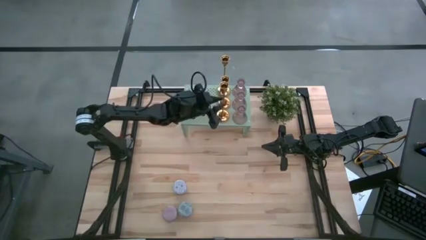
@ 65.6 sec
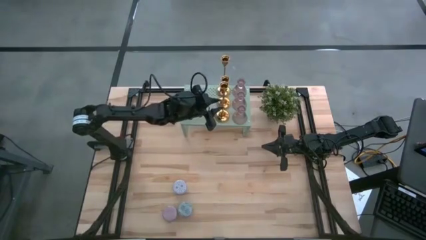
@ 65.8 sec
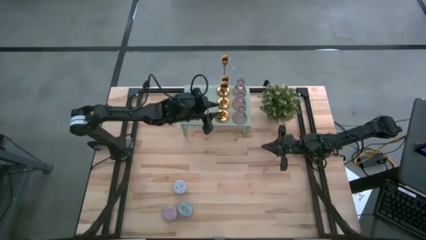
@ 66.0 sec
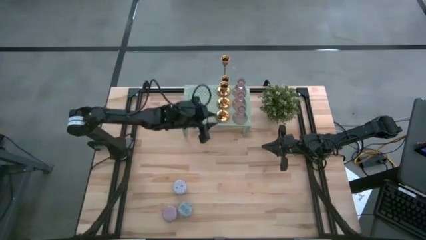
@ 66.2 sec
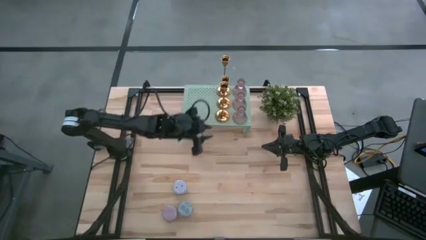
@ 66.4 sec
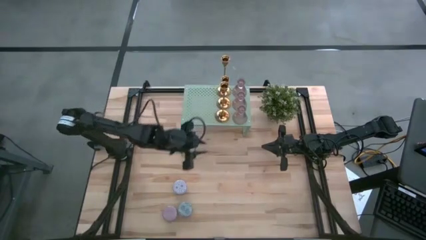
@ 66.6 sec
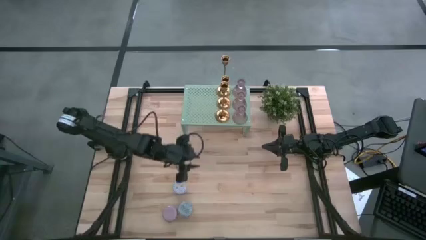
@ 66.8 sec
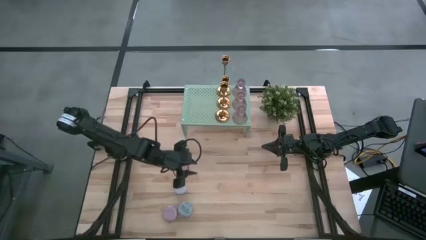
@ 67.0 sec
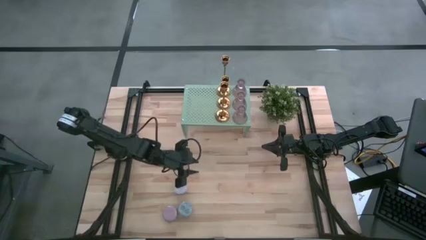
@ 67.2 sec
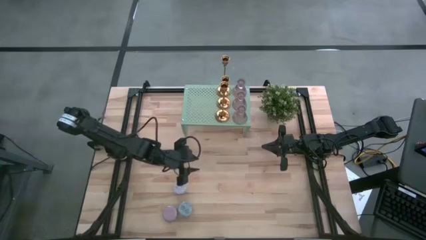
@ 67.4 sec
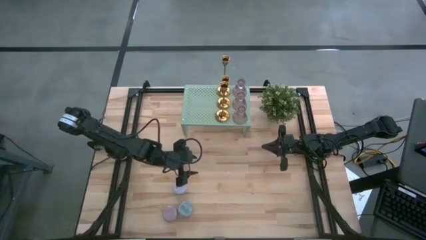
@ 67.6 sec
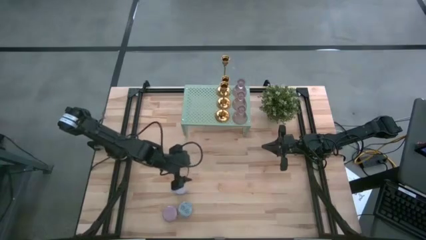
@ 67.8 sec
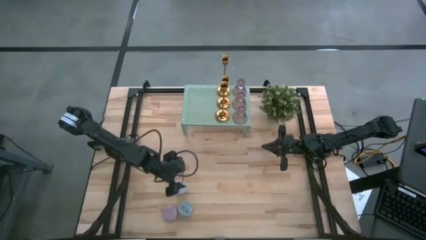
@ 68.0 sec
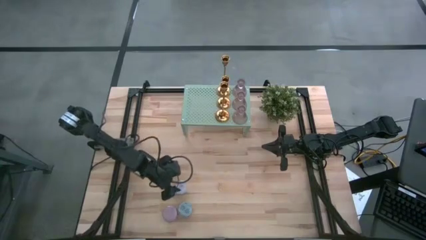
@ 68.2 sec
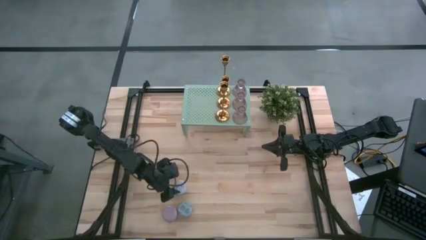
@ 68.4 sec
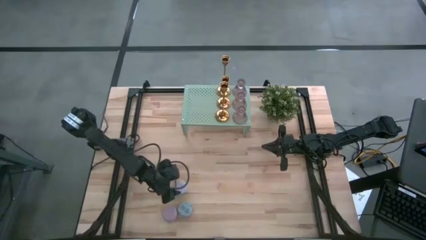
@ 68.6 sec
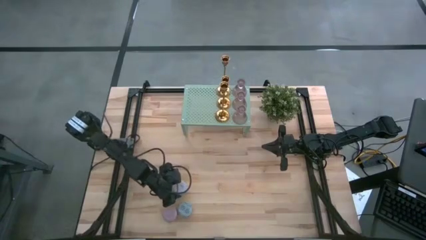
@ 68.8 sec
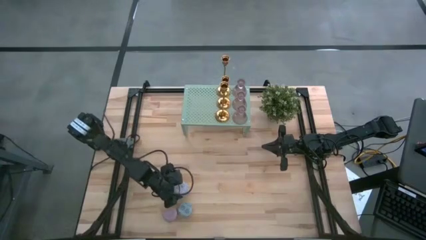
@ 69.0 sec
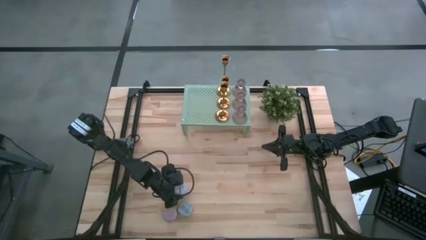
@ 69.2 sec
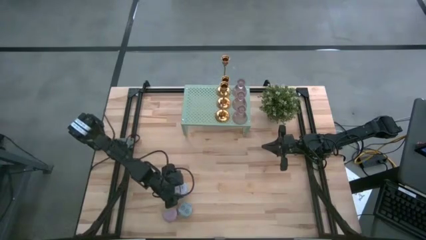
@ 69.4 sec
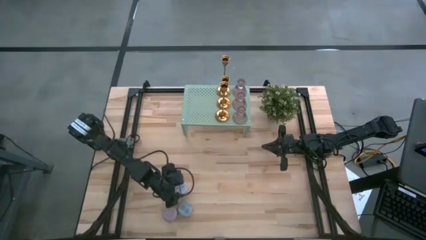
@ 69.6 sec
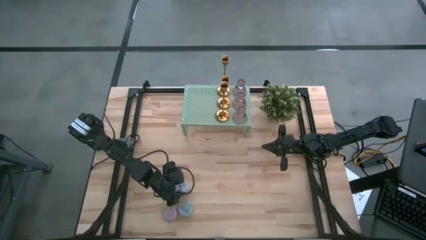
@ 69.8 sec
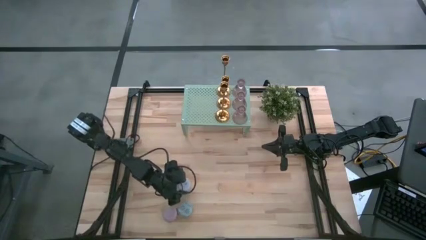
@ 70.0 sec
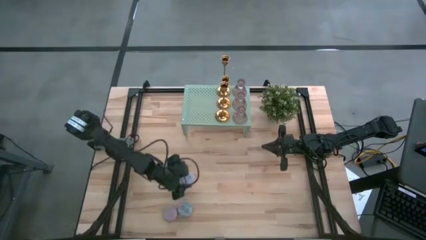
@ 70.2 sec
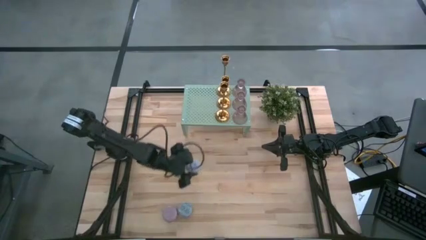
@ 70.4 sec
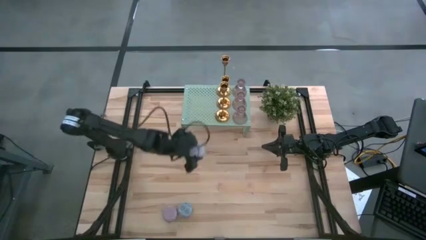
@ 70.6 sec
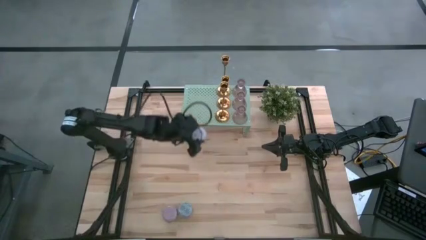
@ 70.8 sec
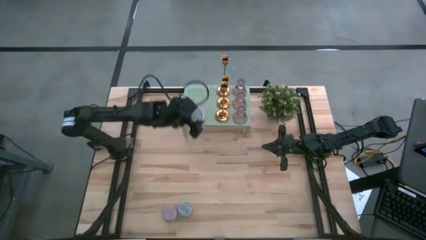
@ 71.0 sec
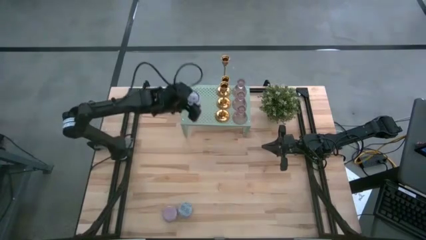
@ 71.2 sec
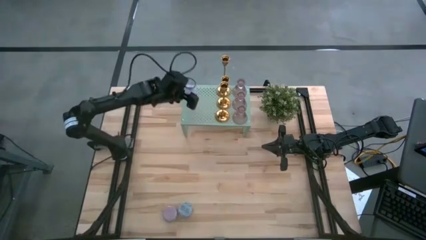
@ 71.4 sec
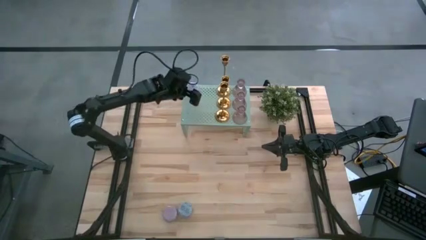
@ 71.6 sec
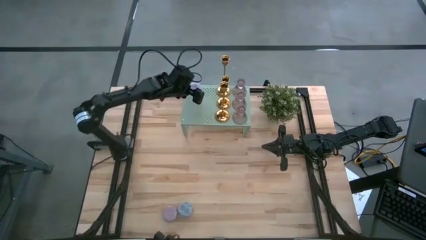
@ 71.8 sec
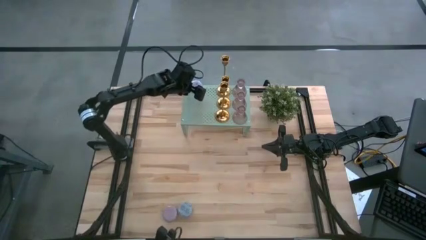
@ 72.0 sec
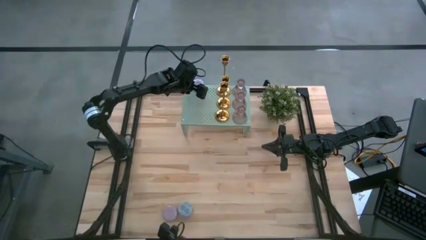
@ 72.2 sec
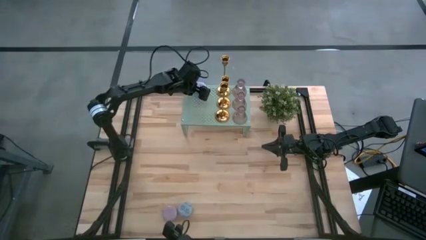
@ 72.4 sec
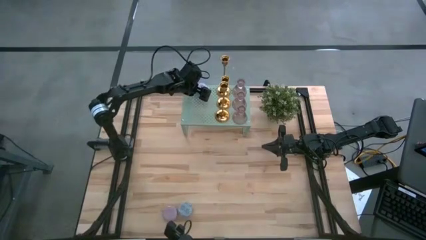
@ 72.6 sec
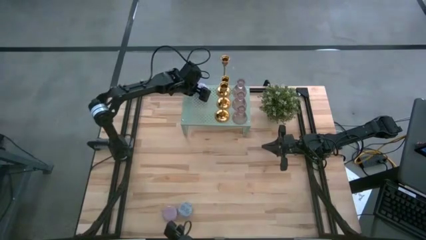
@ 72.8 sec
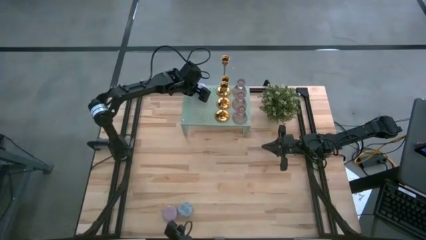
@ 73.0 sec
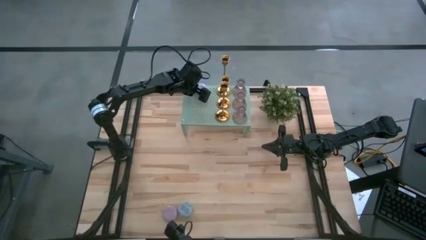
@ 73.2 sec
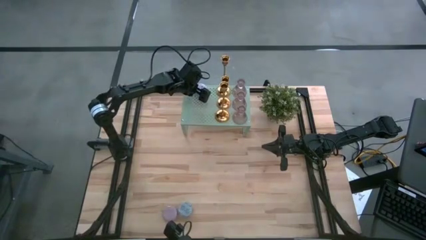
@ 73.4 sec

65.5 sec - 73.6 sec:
Task: Pick & Place candle stick holders
Put the red scented candle on the shelf

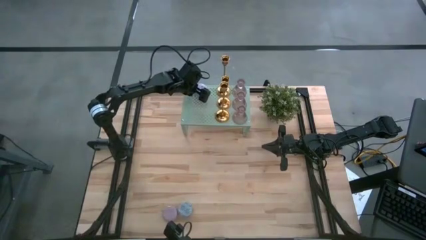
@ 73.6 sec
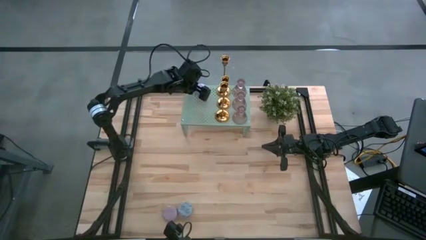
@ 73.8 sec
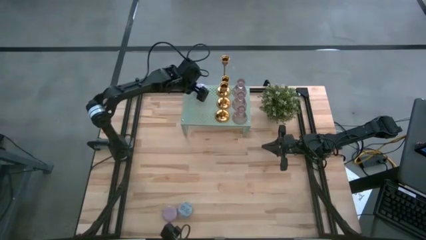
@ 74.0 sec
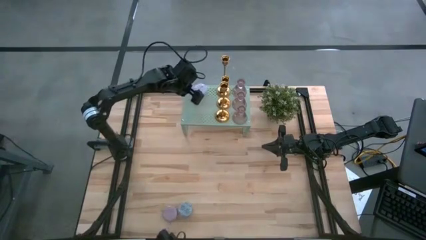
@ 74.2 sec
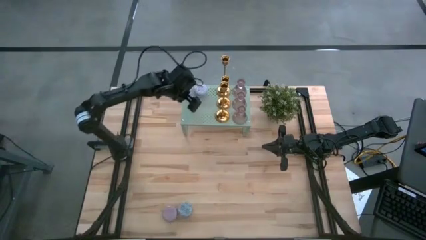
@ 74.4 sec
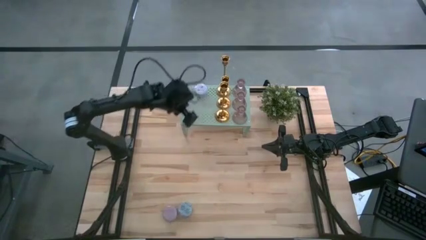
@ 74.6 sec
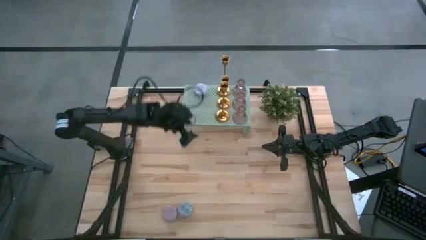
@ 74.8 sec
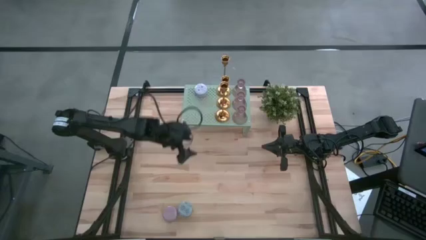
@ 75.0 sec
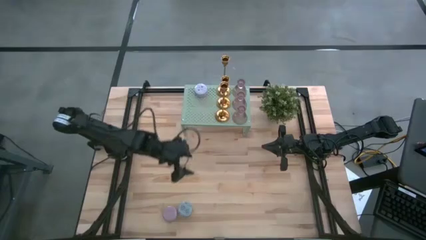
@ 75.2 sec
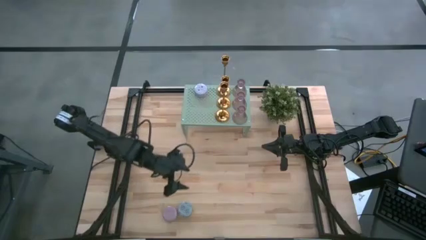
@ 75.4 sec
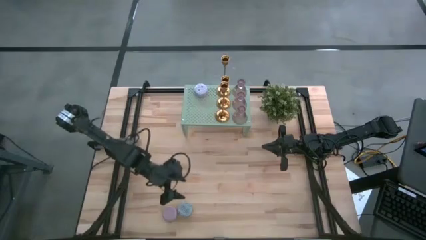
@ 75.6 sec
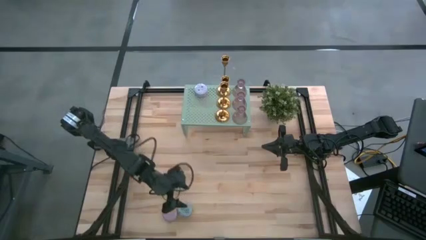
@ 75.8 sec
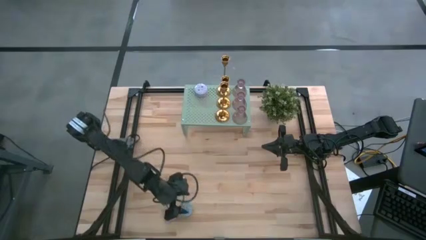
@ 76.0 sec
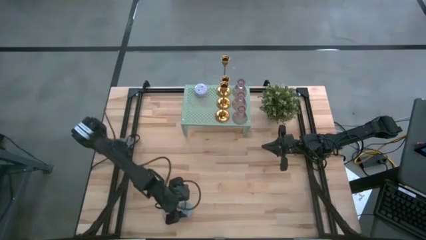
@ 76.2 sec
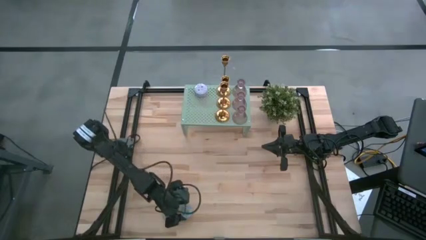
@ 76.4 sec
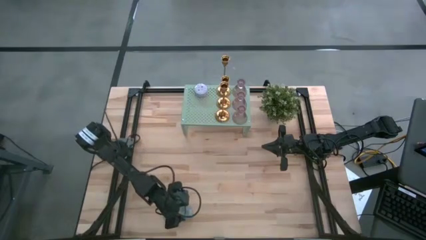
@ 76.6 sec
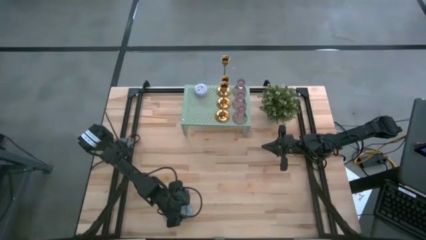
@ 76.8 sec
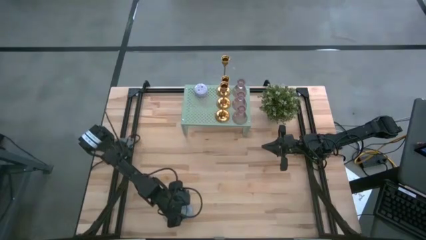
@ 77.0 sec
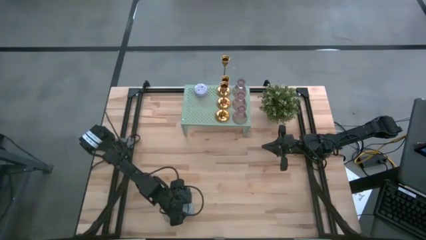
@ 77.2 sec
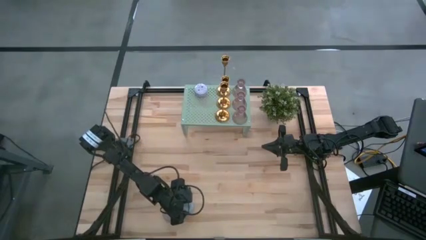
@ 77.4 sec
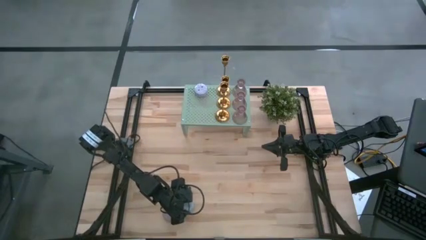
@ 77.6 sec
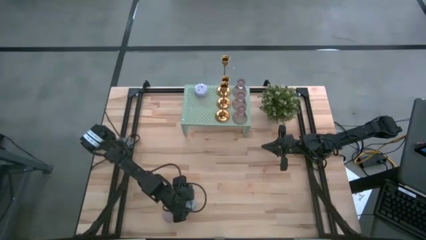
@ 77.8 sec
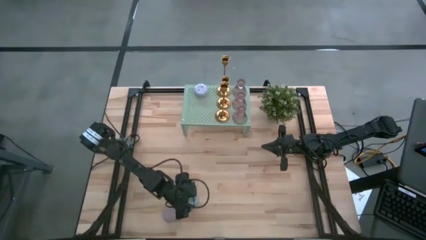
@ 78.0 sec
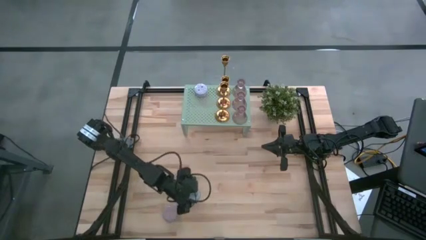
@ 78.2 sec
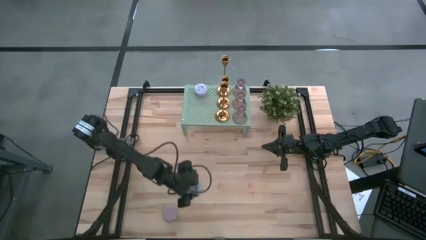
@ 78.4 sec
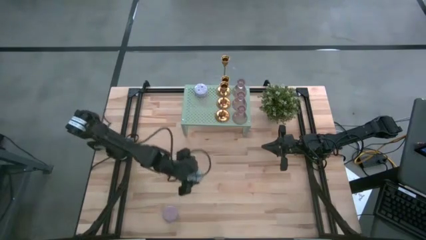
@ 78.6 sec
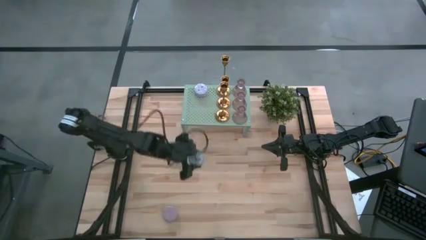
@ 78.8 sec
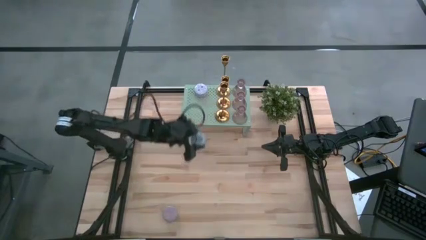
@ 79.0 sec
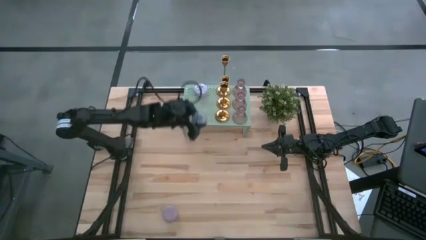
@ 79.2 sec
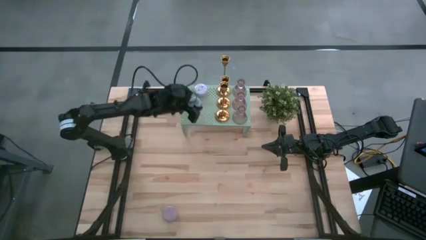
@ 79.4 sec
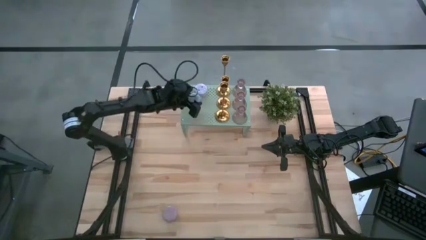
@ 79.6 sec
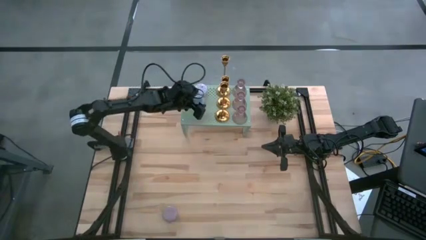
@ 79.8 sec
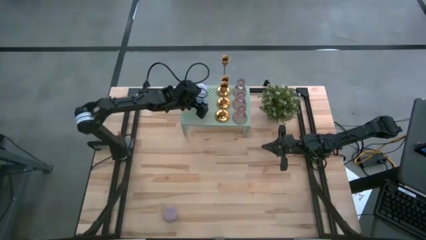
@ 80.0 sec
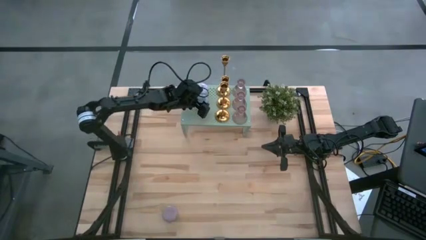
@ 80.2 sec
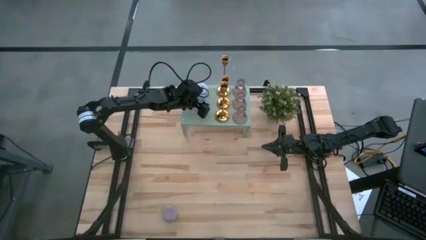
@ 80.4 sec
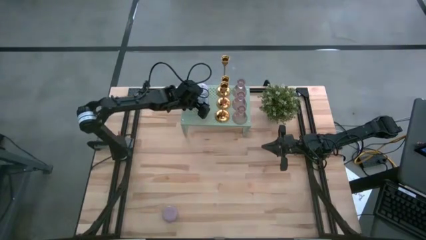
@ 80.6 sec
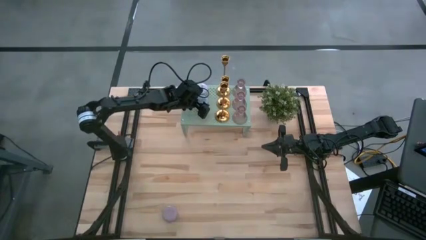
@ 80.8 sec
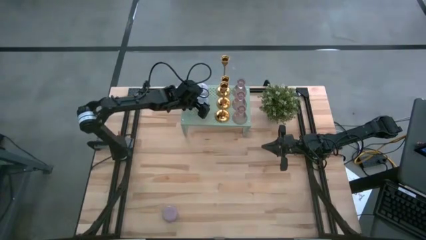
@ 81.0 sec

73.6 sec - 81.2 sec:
Put the blue scented candle on the shelf aligned with the other scented candle
